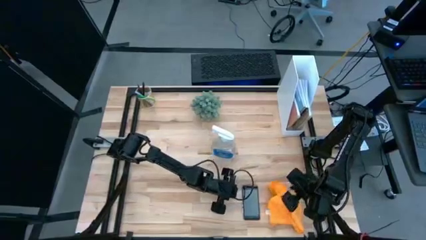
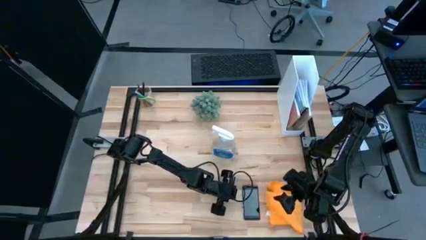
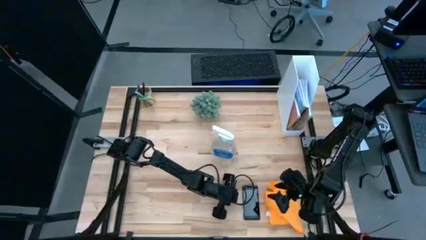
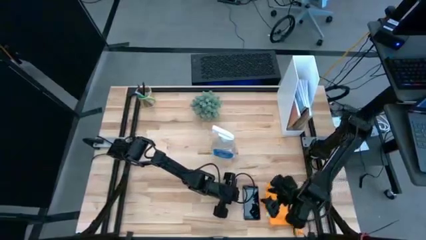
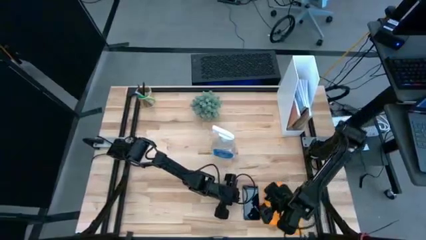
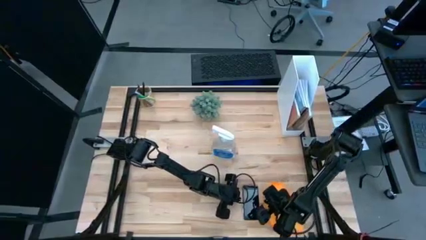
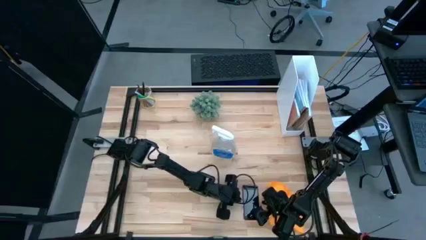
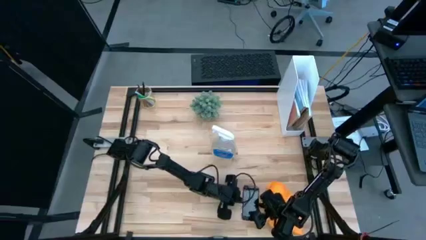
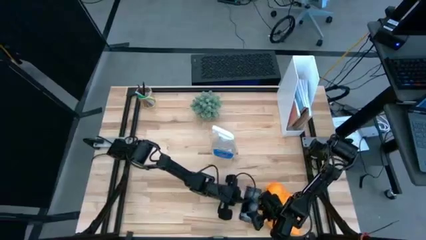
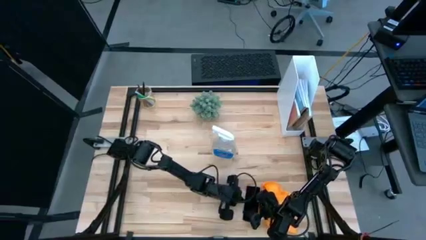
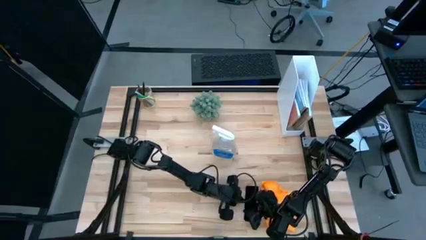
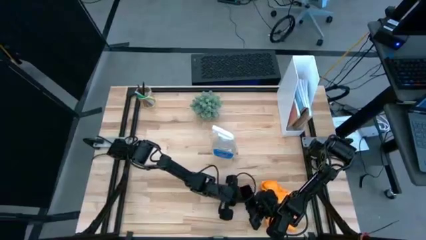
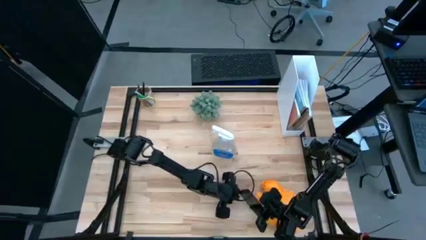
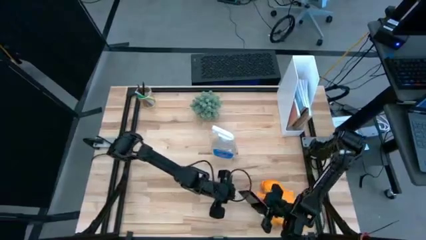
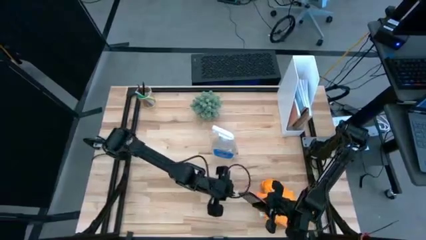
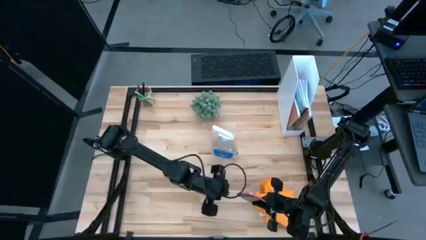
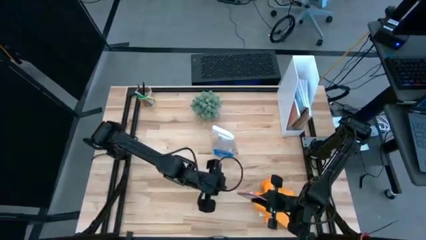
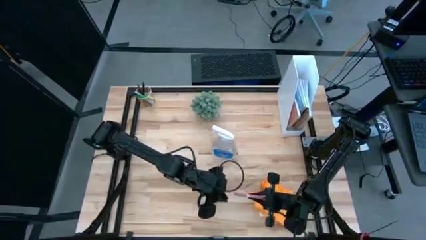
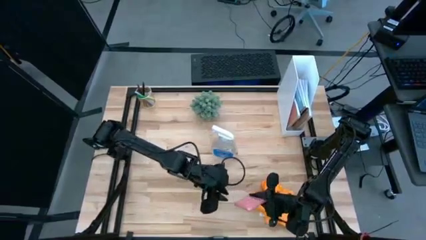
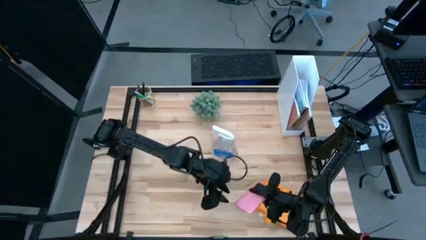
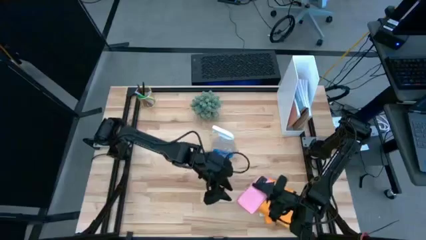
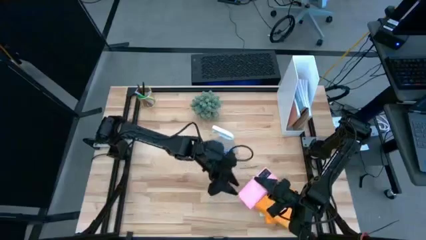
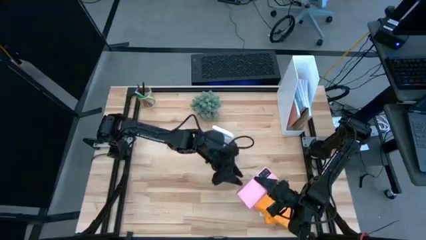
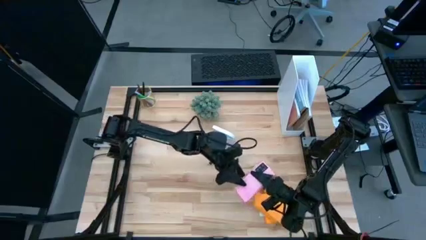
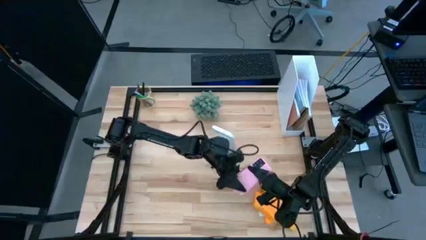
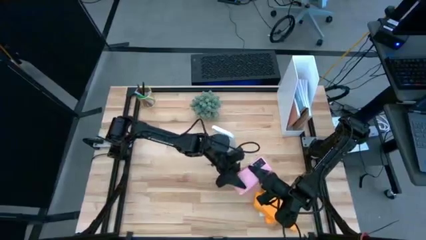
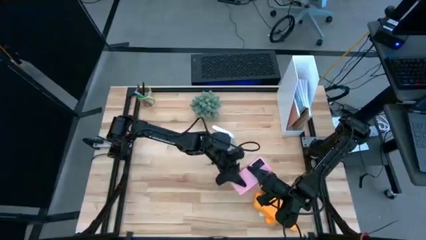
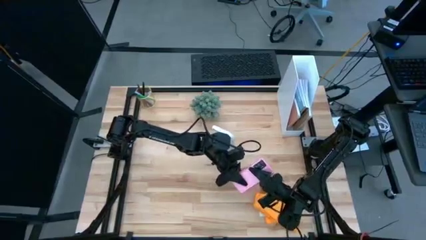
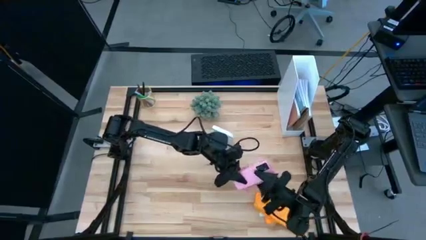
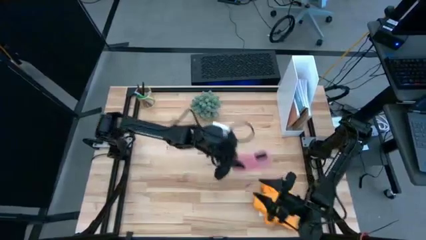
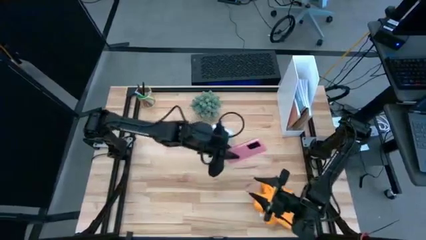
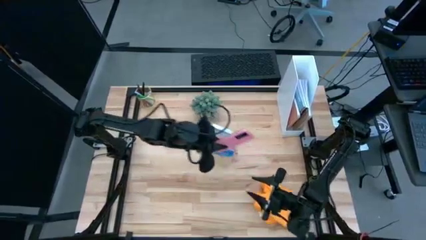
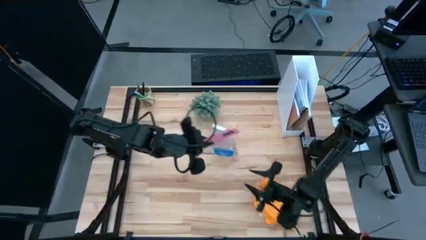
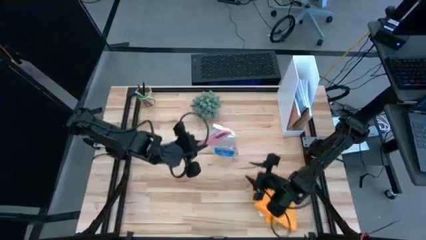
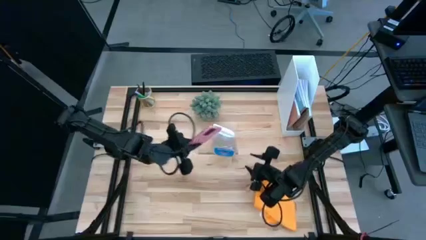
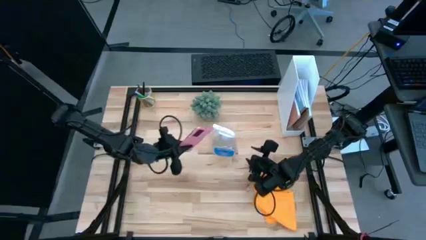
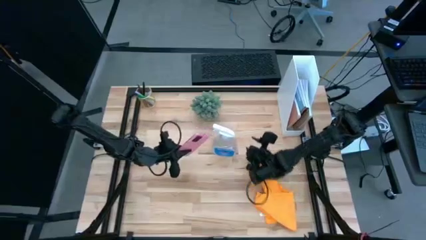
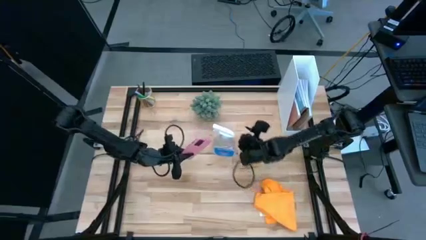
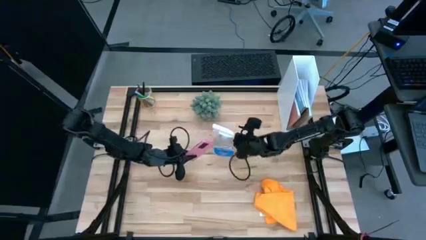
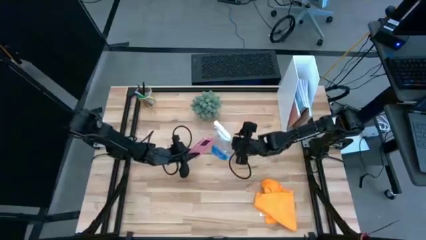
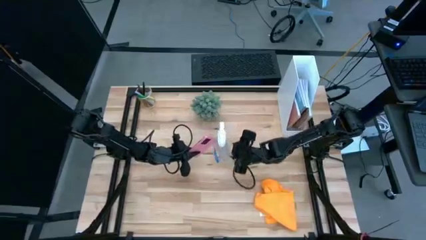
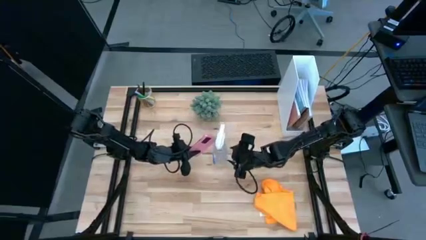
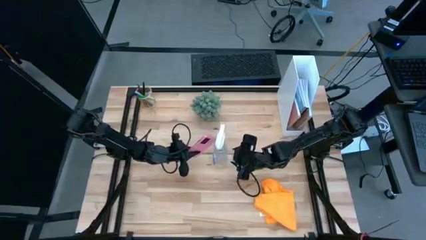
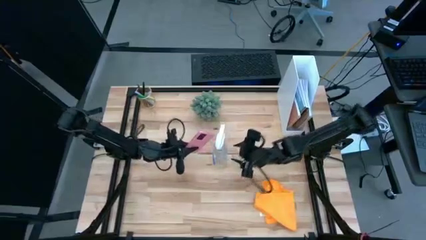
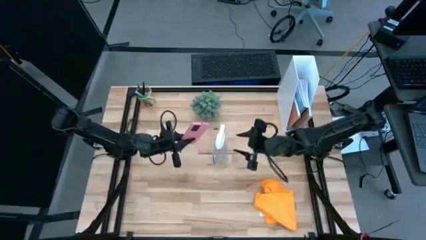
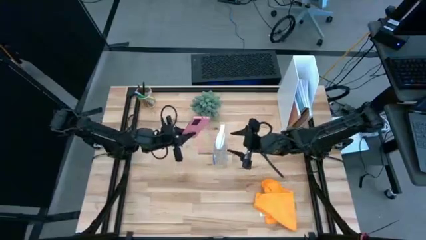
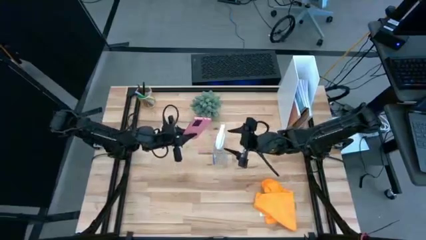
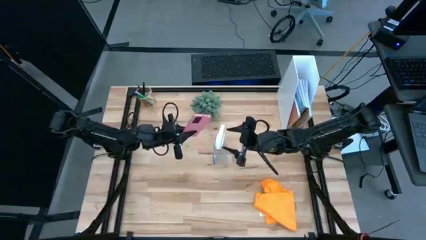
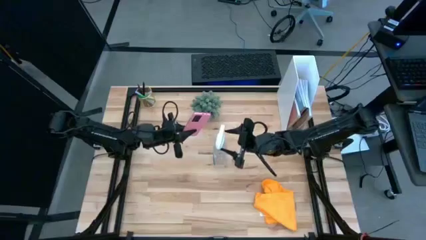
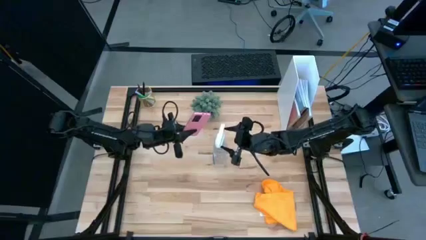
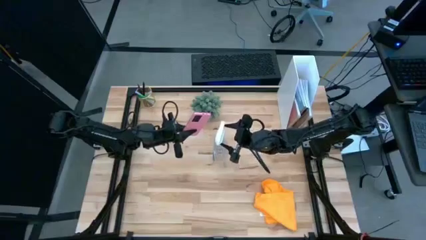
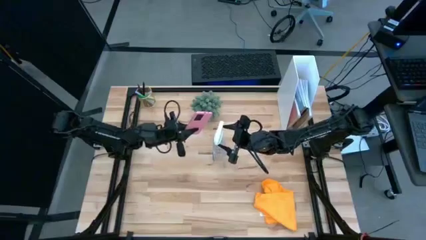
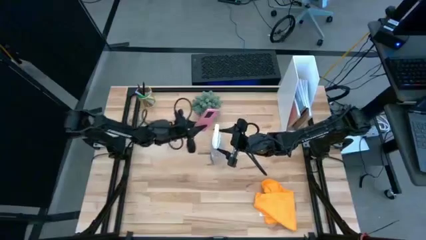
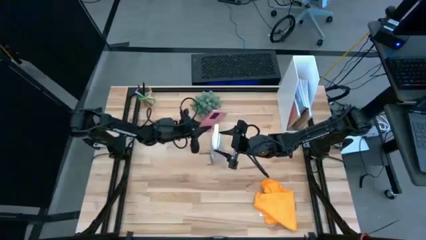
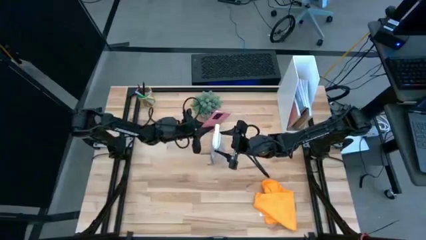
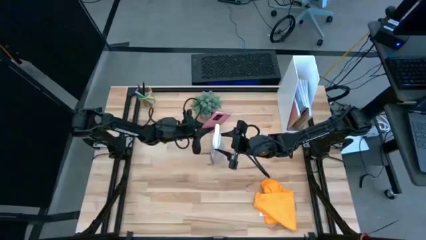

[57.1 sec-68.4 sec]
Task: Apply microfiber cloth
Spray the back of the cellphone using the spray bottle
